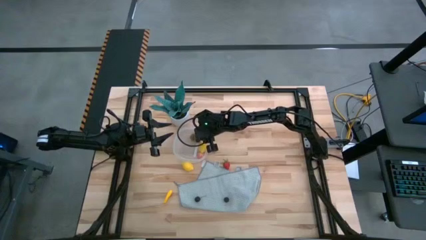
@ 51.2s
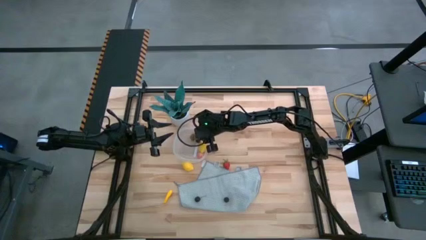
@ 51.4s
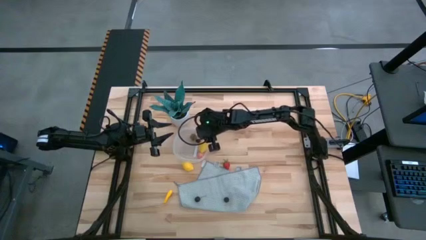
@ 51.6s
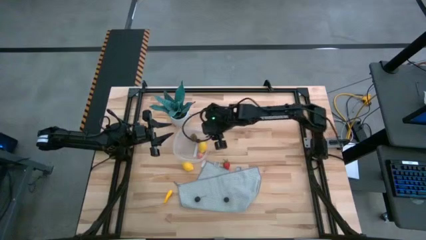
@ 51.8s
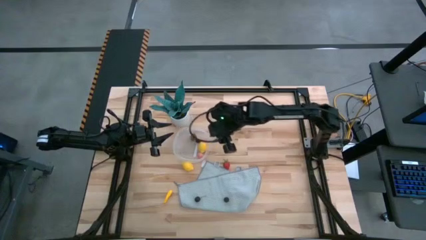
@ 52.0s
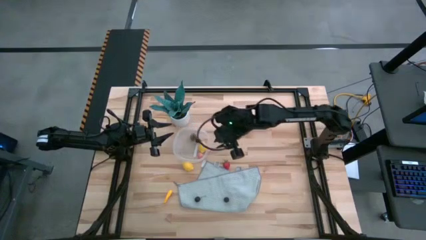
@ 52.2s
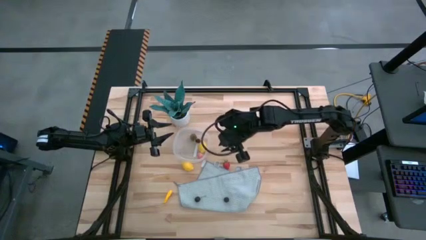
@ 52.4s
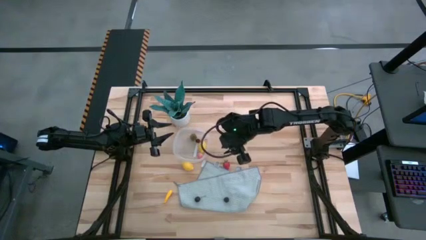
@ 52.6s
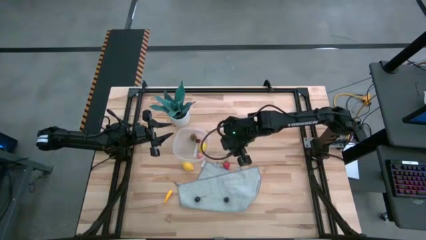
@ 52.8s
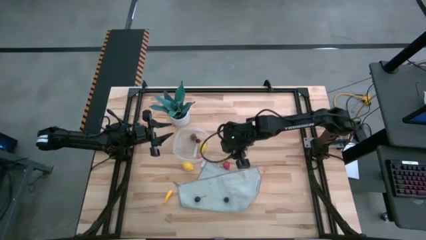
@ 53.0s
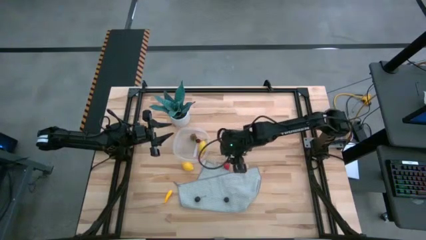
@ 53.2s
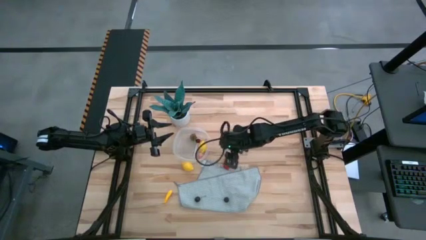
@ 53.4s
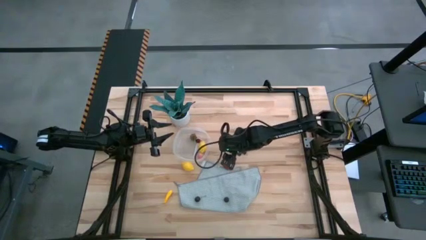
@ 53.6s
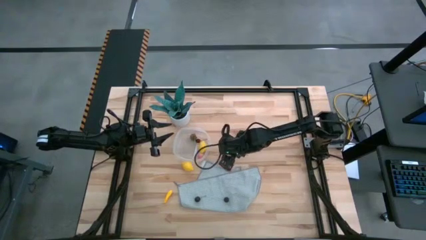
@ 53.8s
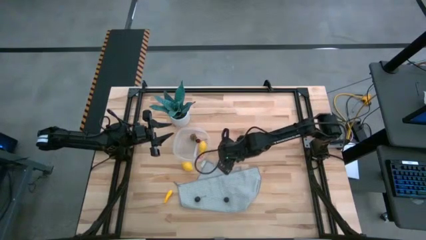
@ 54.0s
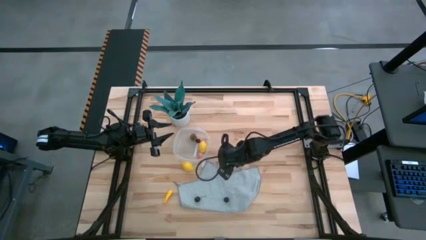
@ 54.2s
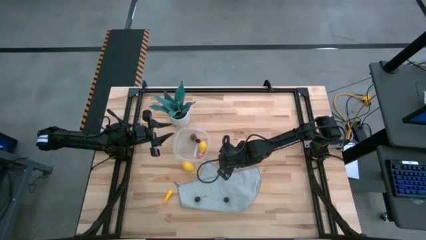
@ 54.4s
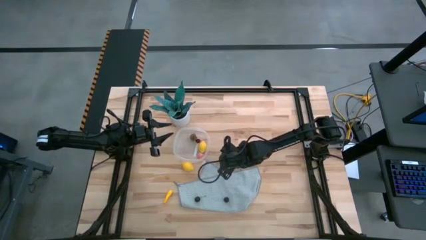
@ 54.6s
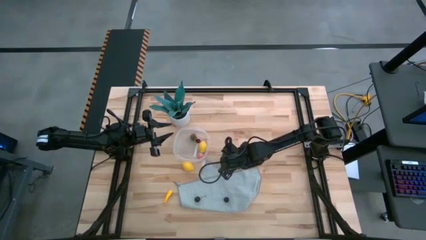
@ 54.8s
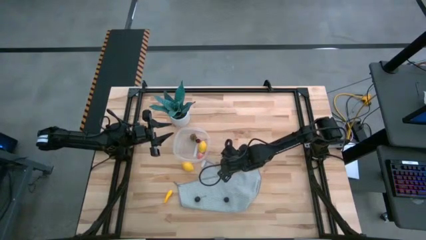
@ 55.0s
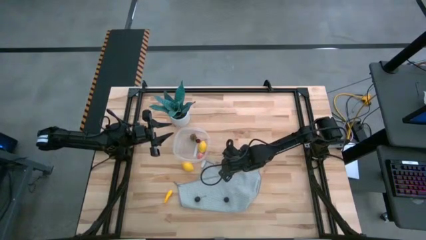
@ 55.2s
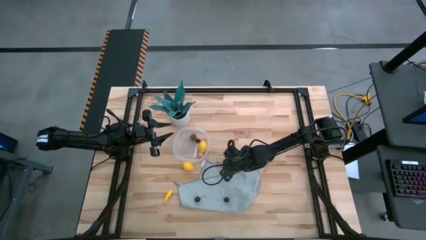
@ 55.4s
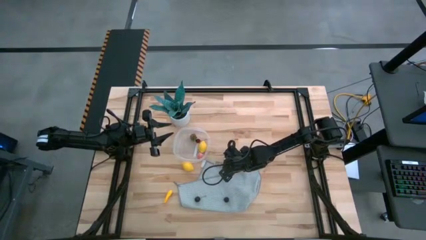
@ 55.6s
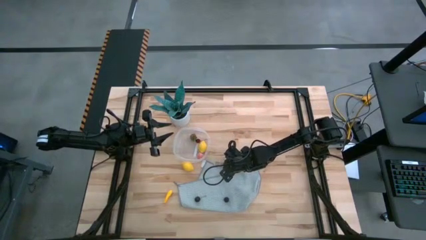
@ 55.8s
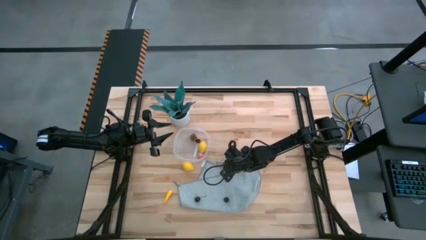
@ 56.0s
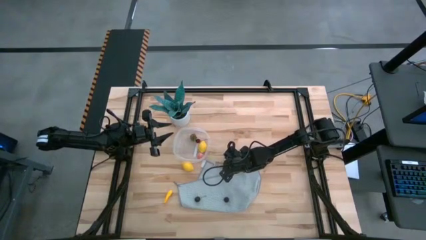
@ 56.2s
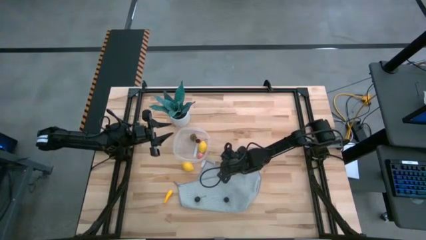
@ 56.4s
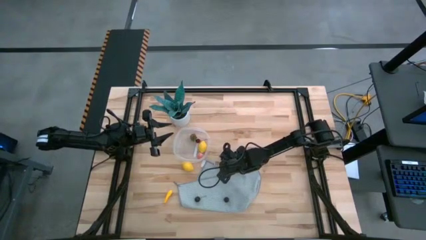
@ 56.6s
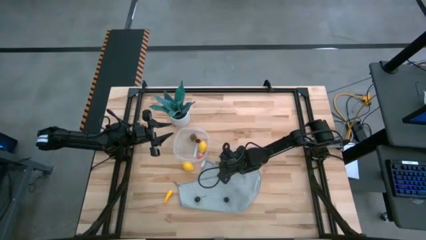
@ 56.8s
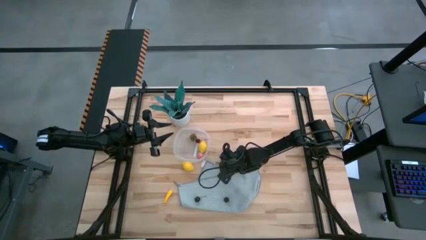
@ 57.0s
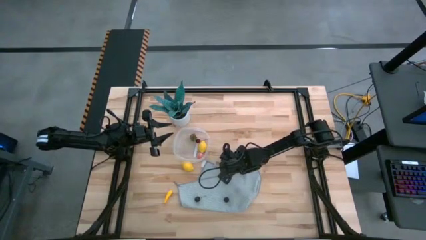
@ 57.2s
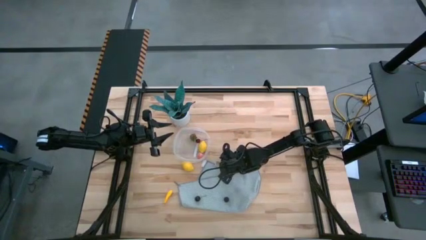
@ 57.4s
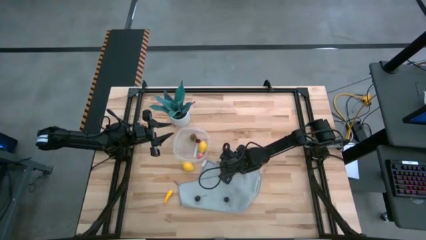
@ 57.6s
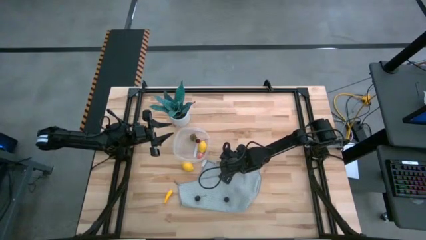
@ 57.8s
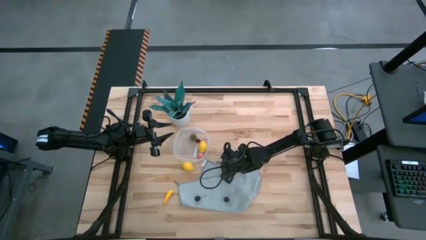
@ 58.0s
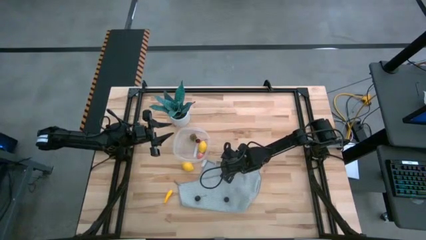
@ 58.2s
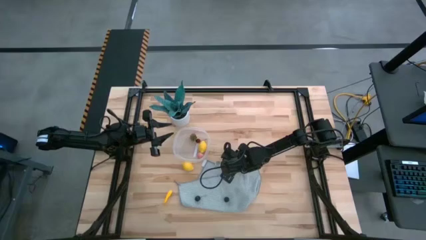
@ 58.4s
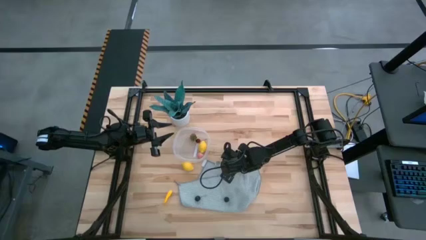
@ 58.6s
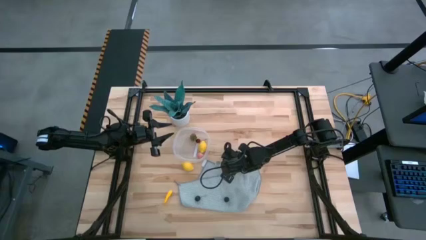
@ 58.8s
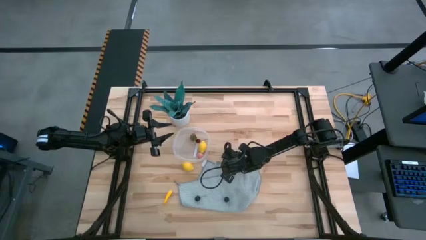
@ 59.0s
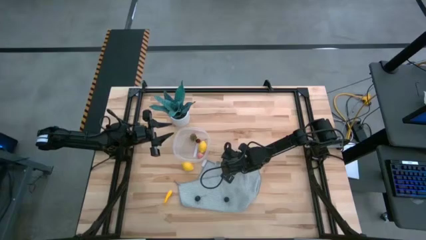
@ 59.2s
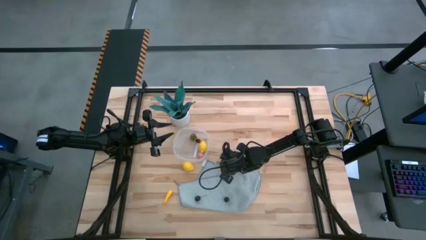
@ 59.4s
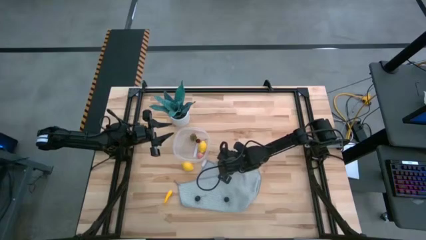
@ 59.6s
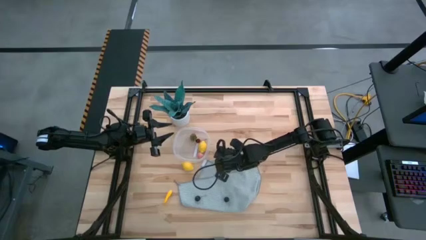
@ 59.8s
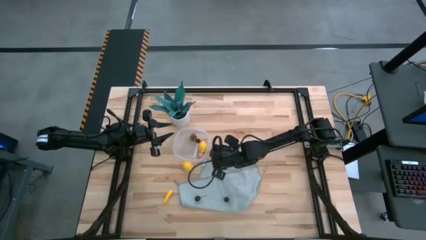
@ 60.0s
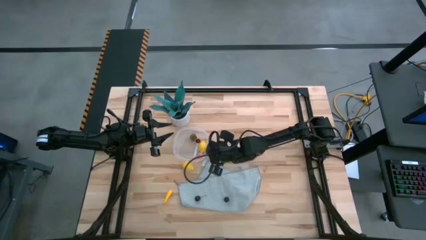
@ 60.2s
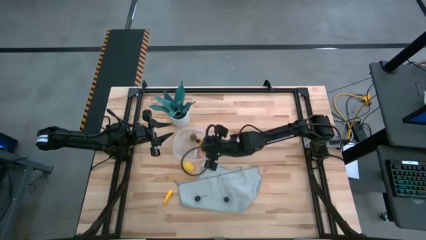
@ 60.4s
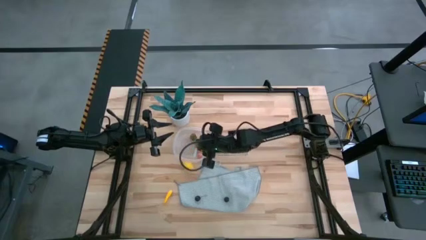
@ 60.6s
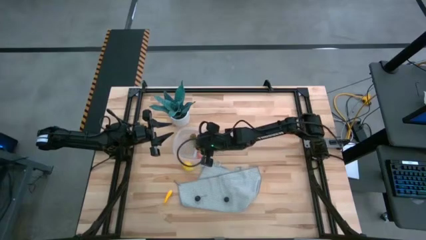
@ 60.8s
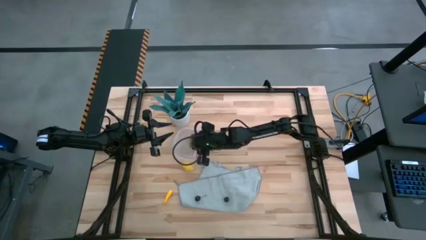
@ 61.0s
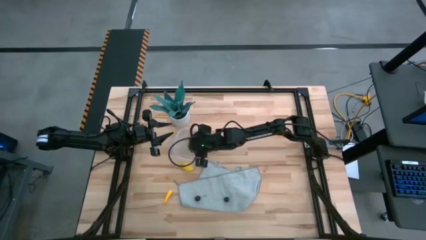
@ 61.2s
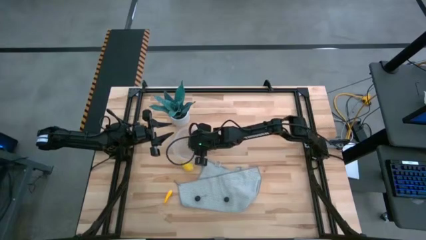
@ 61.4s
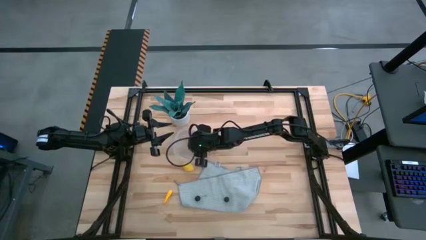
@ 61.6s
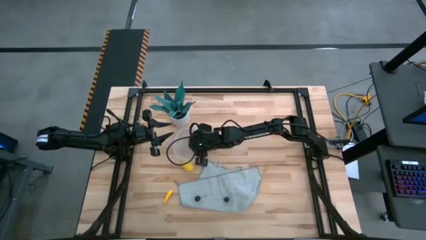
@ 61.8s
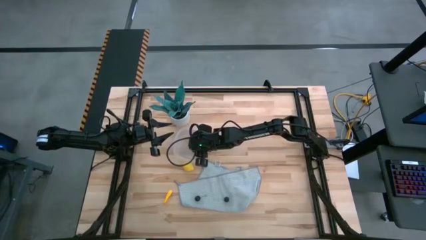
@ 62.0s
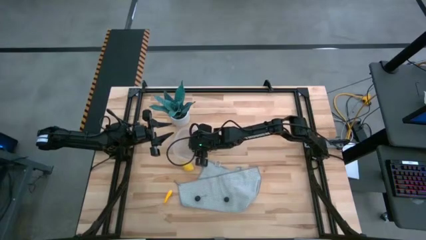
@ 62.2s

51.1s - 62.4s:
Task: Pick and placing Produce into tupperware
Put the red strawberry into the container
